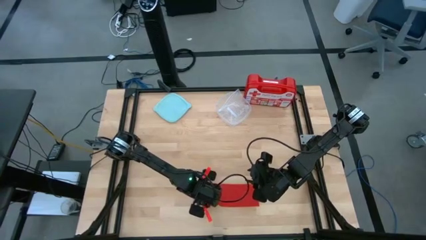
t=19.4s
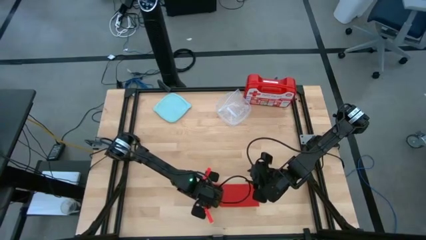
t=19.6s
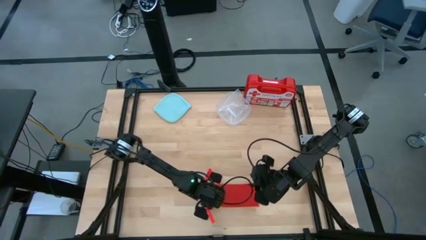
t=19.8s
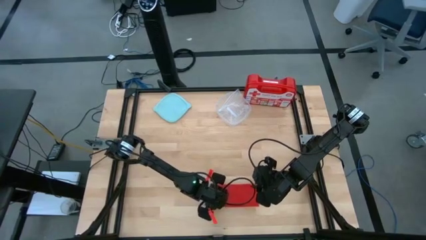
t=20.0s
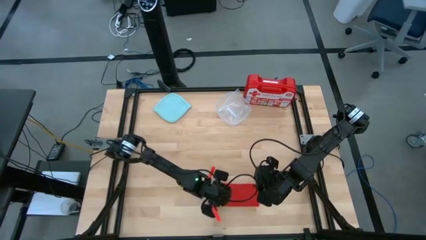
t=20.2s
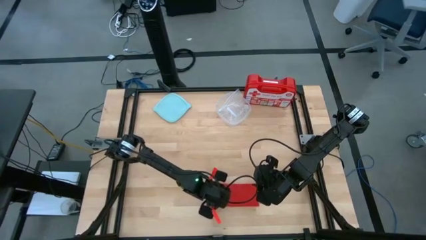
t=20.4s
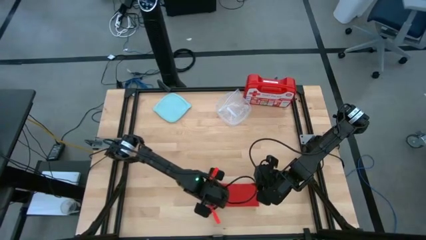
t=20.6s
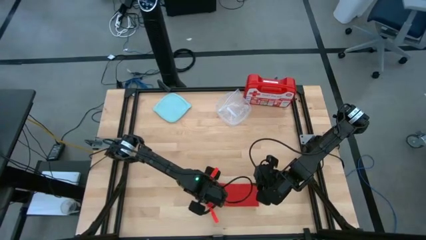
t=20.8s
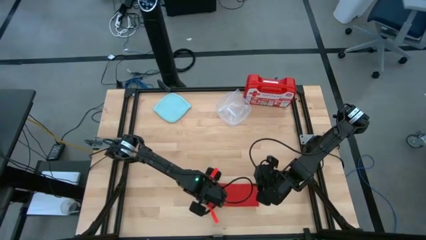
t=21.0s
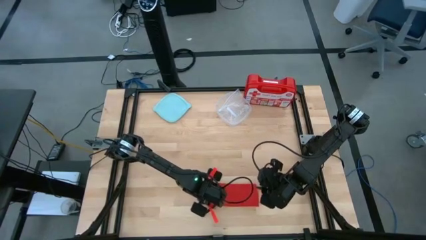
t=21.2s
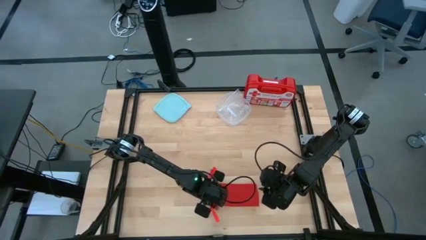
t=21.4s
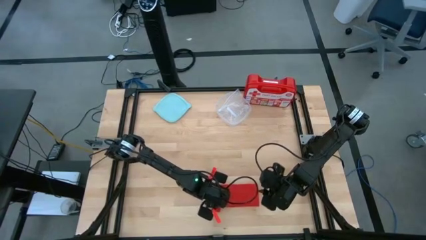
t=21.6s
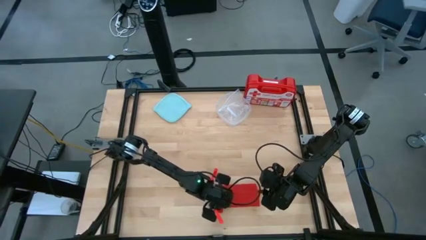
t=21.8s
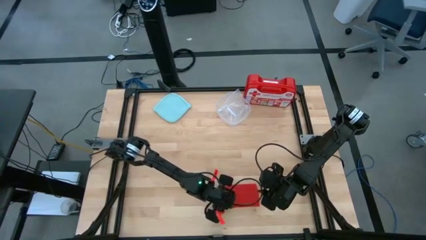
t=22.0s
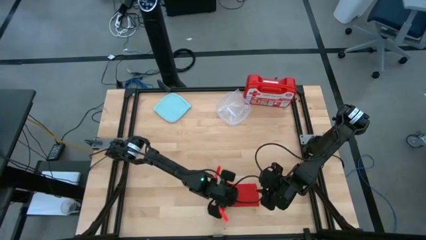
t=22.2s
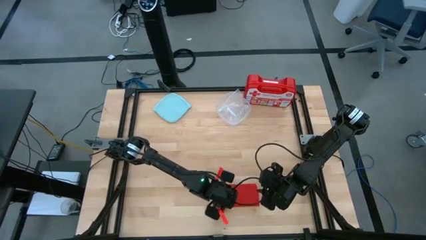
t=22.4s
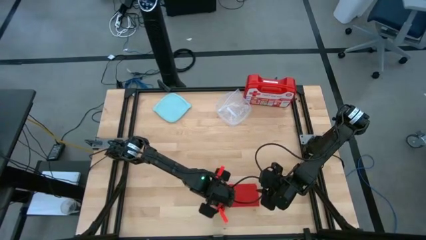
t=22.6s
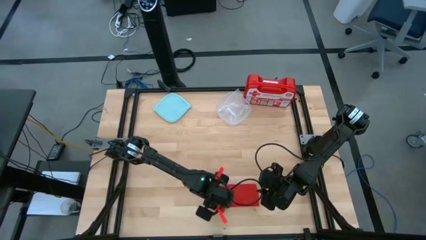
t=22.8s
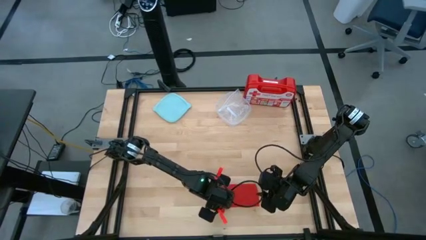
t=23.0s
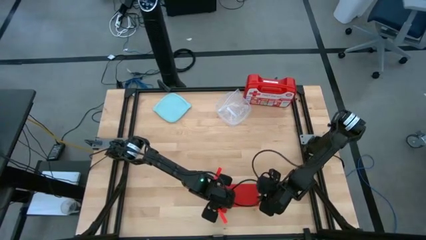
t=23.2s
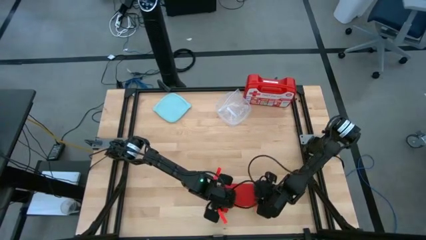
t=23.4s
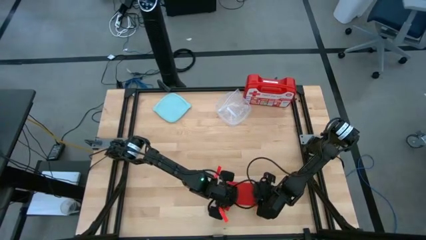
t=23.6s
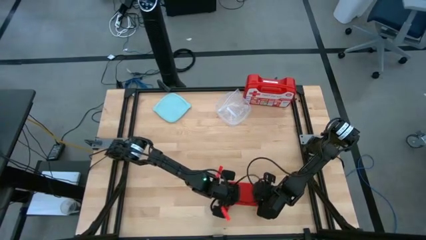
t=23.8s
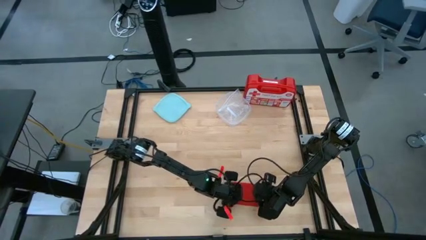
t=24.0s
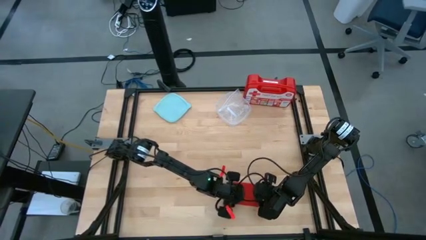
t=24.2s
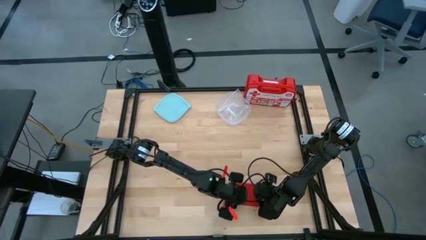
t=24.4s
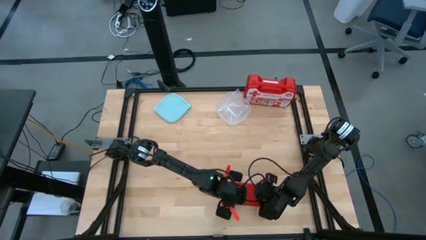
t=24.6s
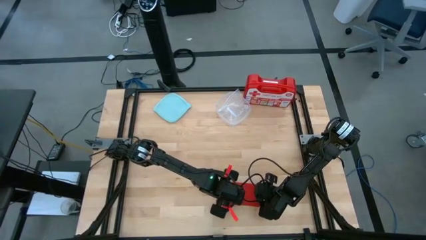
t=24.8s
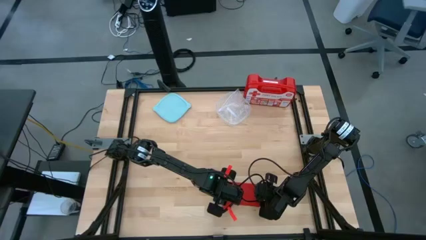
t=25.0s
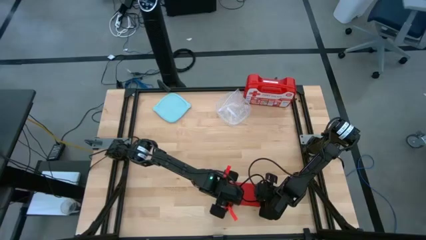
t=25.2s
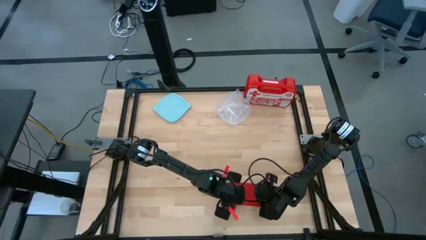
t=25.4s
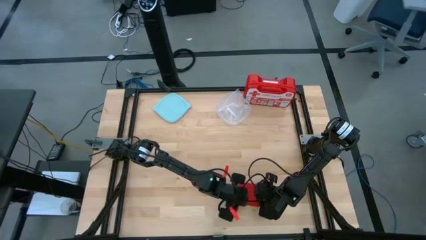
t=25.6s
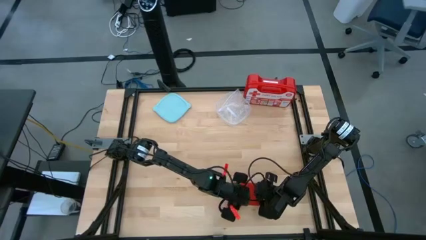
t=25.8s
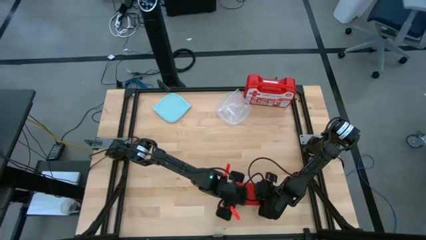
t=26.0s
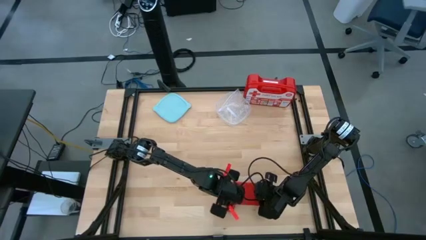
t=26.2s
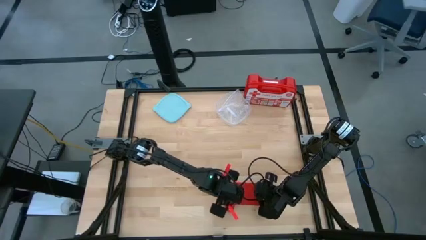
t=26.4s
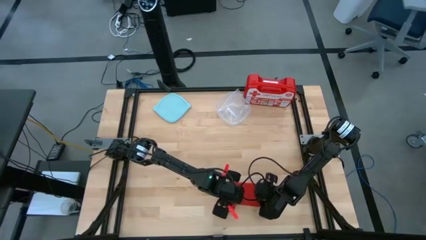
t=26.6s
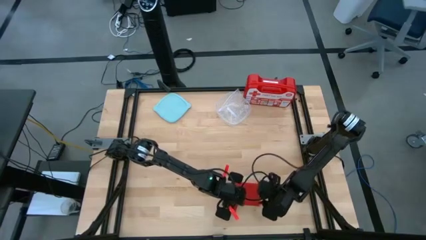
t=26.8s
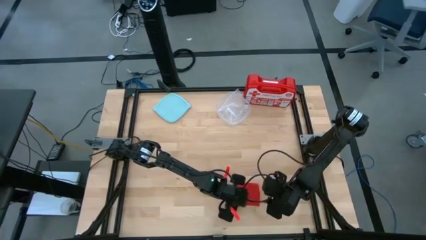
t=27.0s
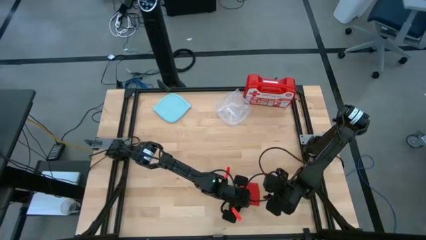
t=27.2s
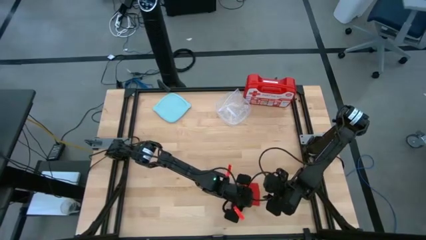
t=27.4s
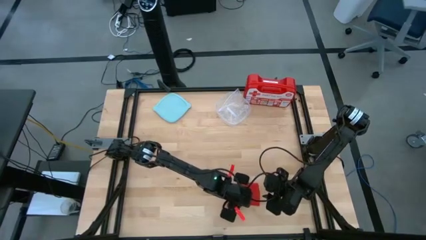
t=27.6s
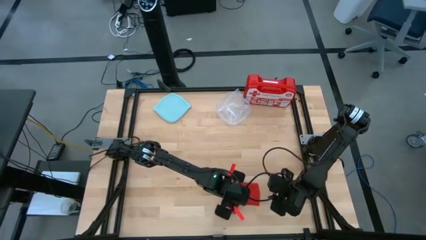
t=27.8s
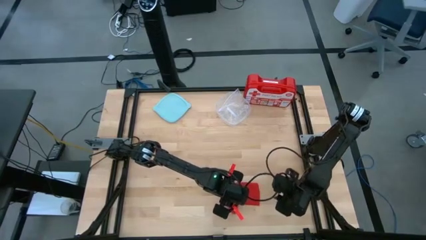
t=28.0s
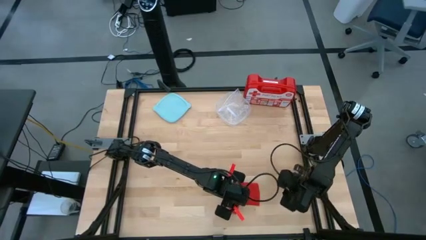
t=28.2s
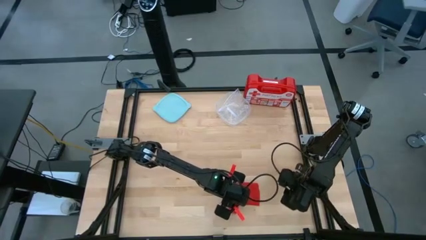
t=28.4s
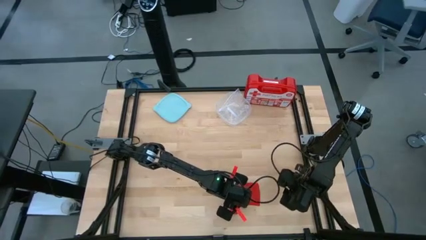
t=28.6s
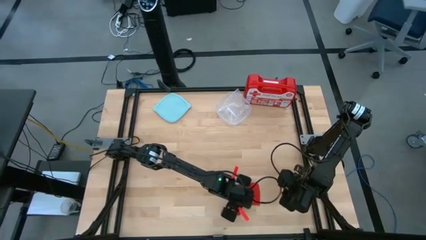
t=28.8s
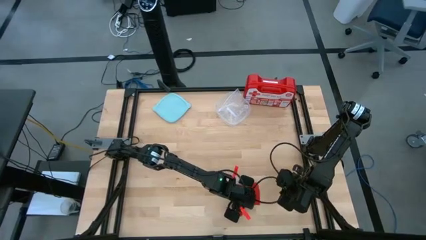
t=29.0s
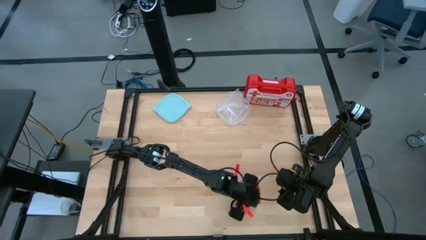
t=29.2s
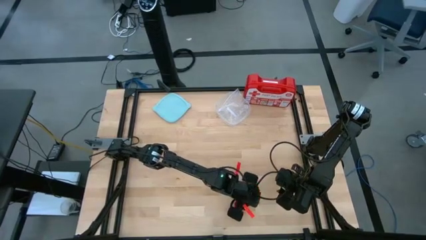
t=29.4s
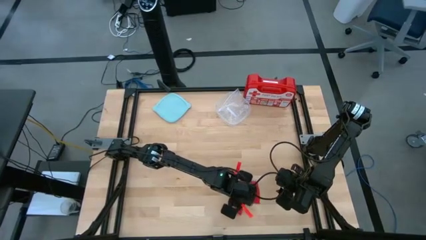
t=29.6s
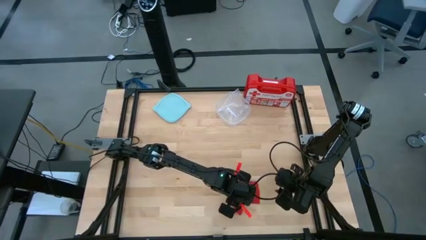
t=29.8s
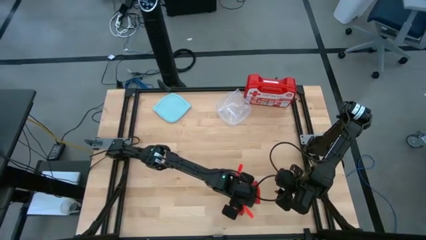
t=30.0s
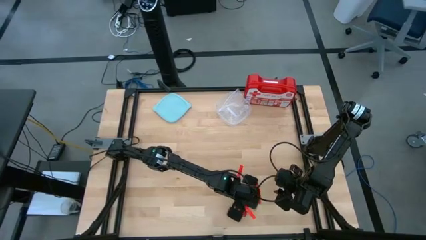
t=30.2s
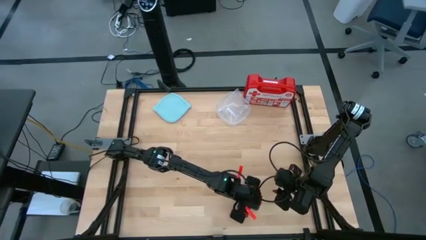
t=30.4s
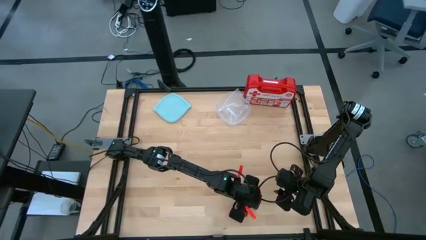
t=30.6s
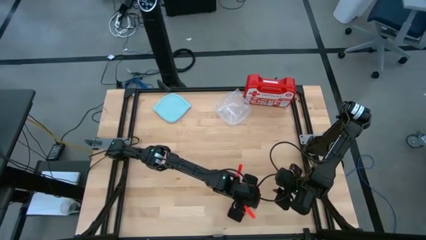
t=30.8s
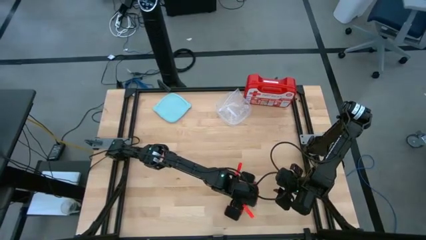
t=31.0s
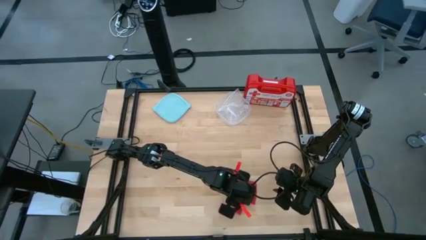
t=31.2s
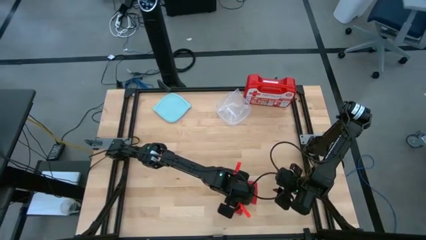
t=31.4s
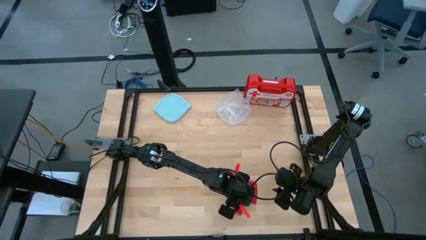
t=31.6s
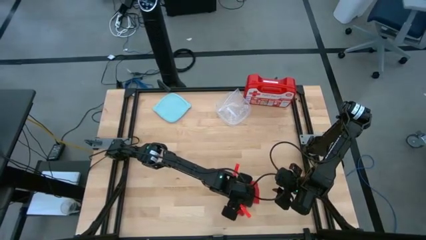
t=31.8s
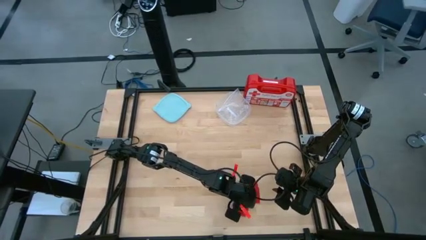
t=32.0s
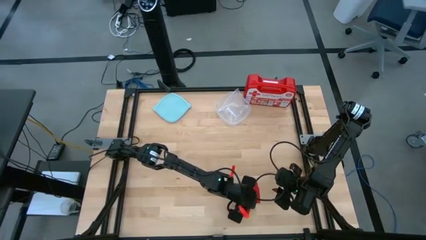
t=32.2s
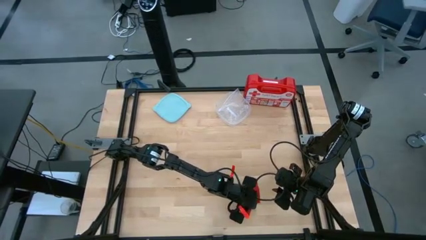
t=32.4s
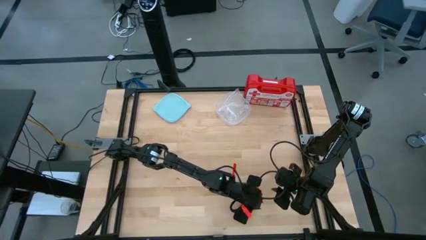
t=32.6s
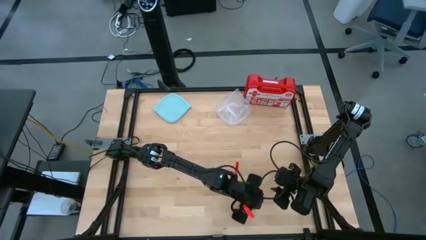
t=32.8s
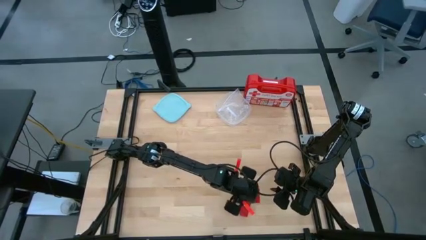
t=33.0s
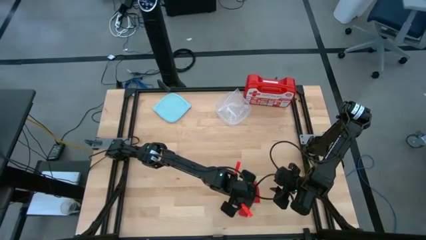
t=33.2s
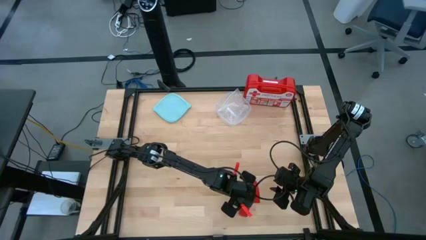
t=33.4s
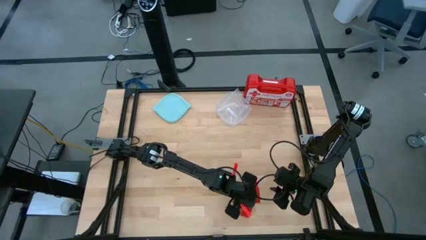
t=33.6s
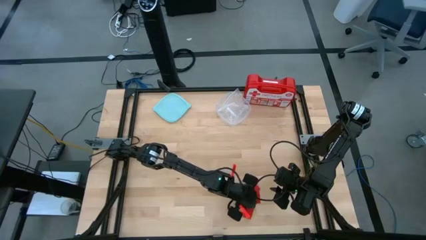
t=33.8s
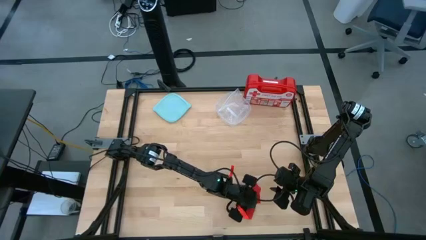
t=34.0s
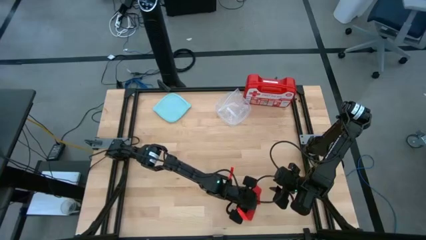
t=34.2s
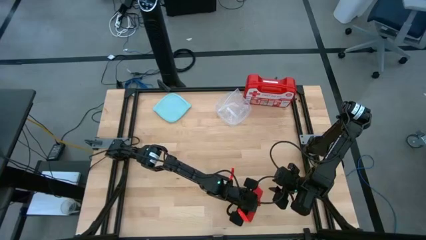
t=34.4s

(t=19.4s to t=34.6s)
Task: Roll bandage
Roll the red bandage
